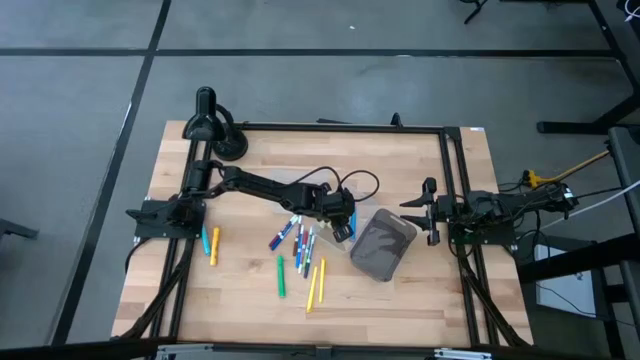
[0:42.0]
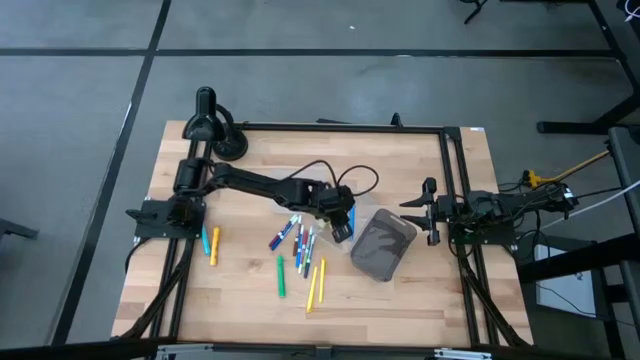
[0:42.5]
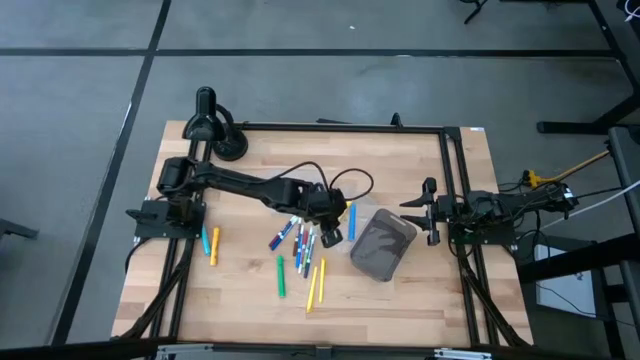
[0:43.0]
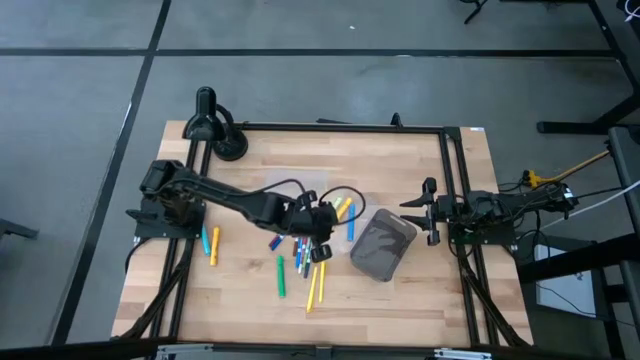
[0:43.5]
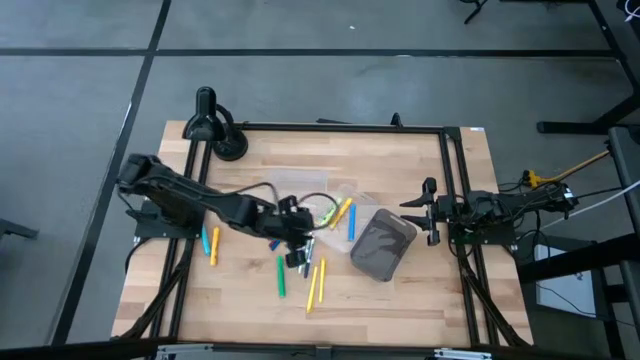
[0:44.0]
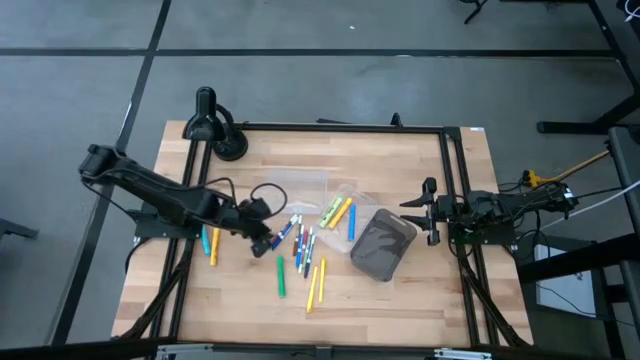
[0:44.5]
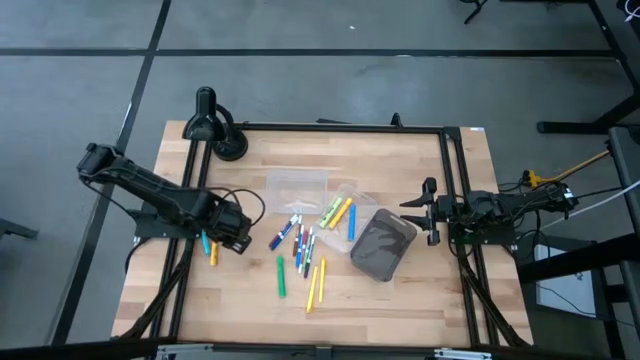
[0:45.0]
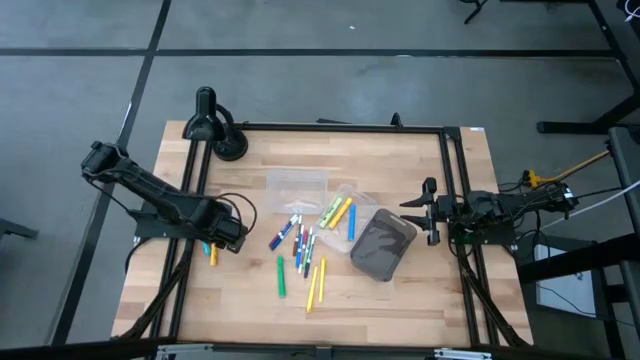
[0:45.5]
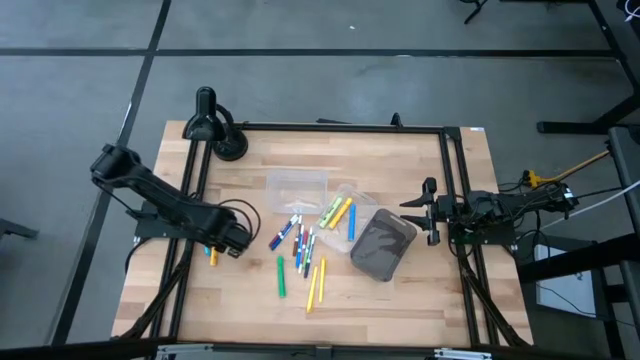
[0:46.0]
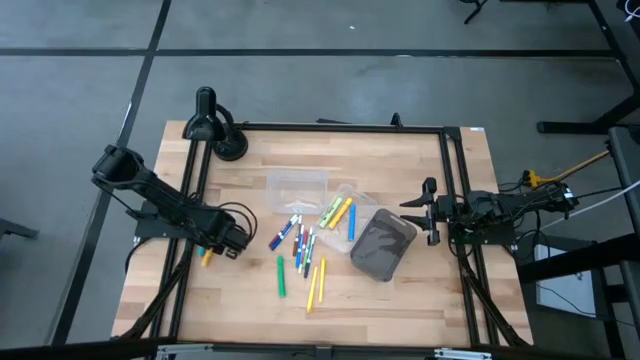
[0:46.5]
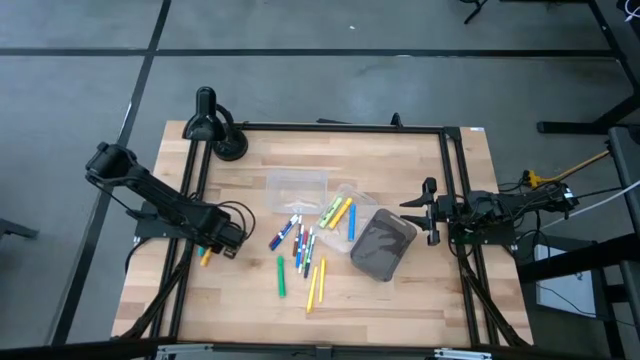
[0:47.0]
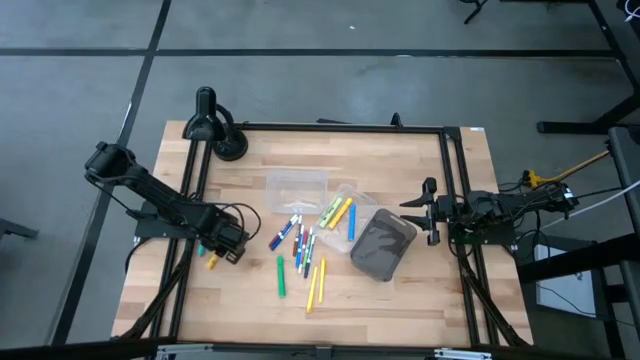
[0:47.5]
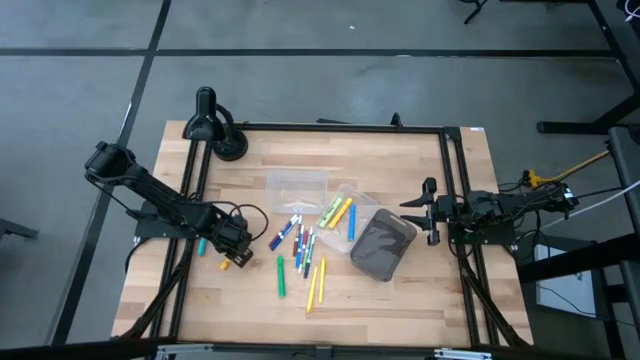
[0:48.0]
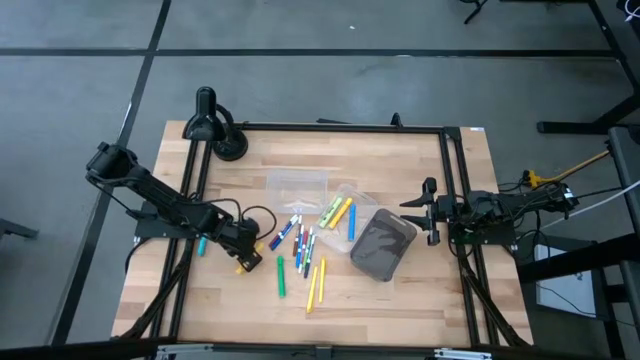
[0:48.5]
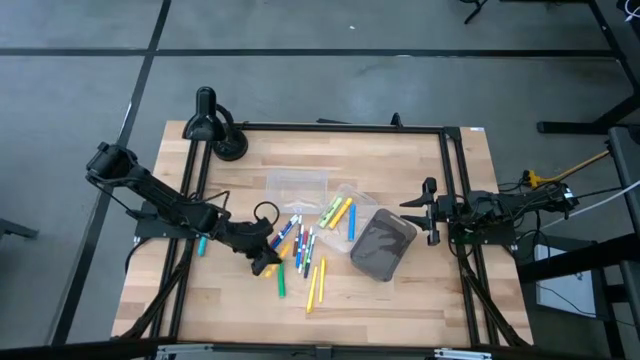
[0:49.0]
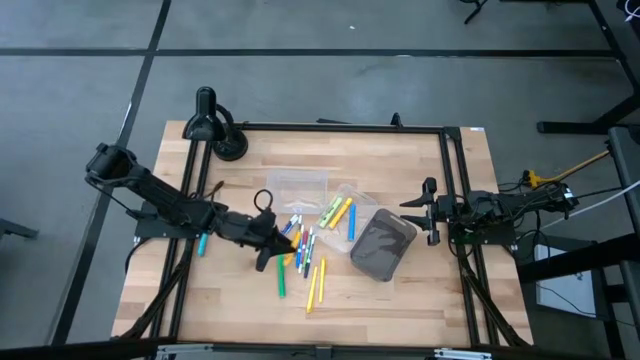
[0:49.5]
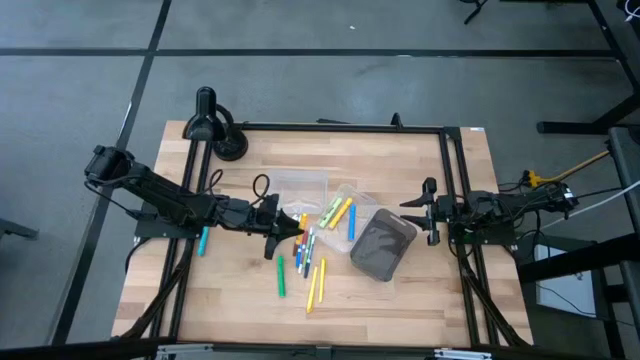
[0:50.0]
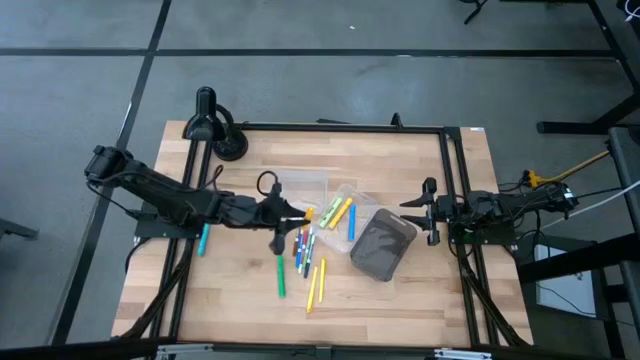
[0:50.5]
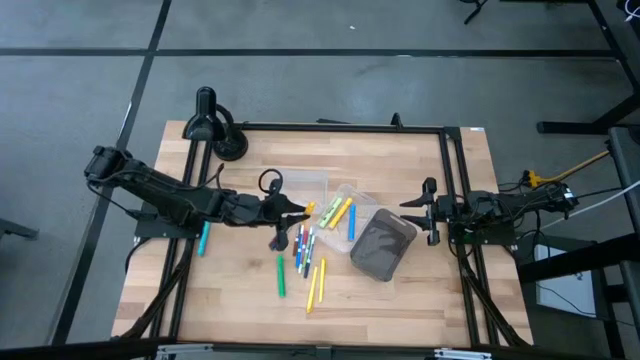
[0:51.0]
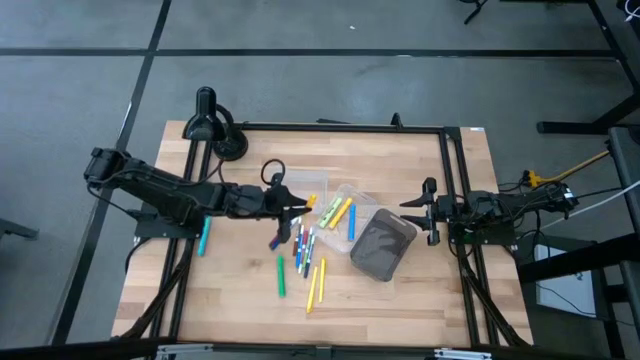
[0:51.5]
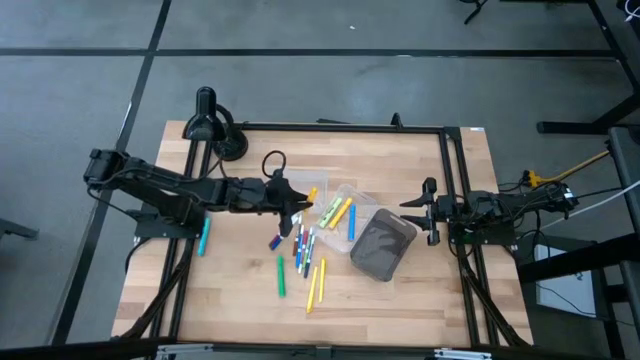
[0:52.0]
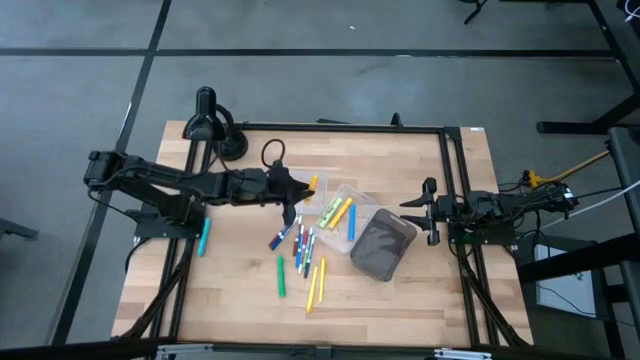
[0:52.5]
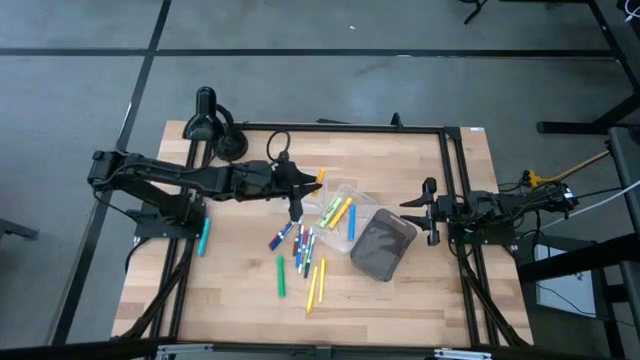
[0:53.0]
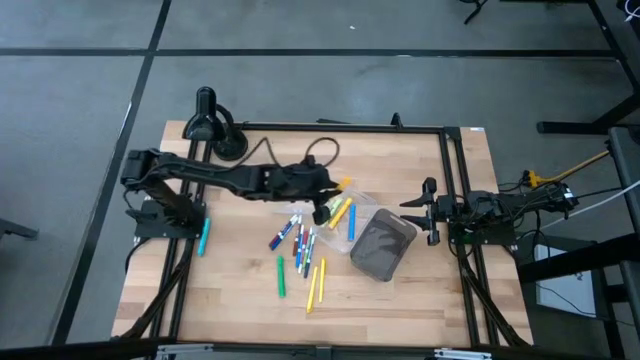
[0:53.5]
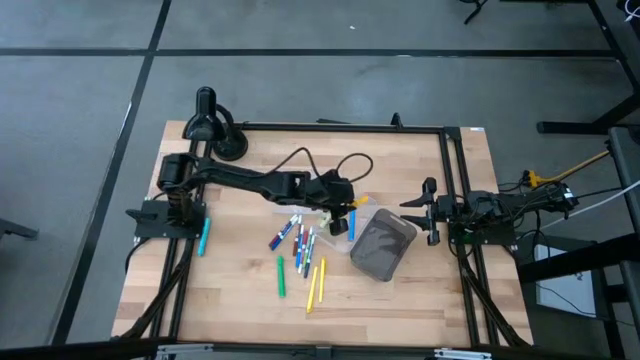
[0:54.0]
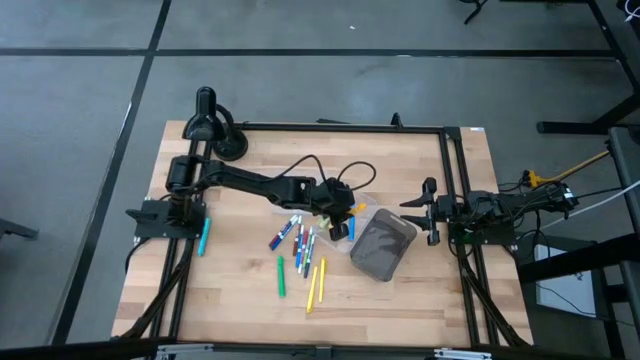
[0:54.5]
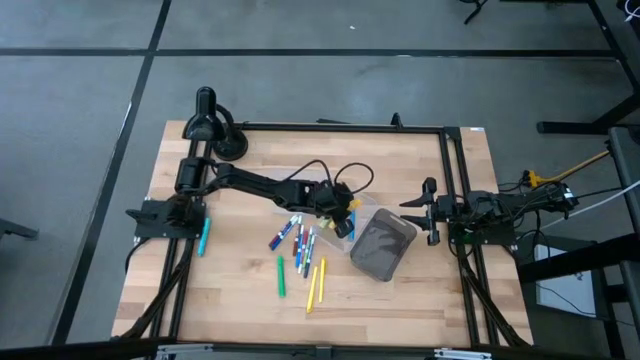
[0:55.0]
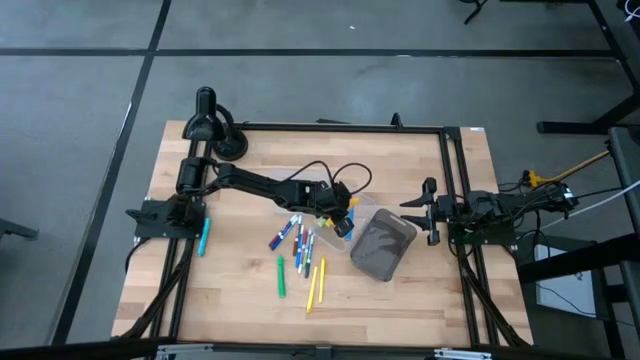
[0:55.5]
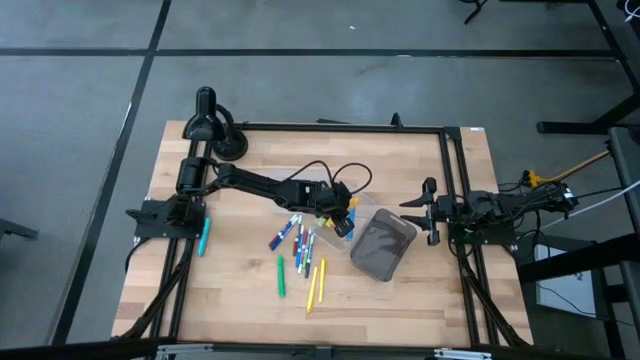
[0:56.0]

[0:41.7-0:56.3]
Task: Pick & Place Markers
Put the yellow highlighter pen into the right transparent bin

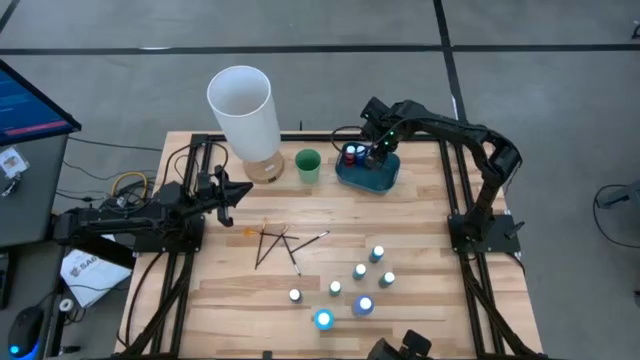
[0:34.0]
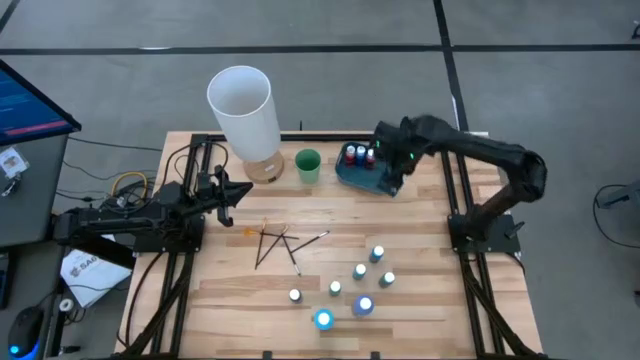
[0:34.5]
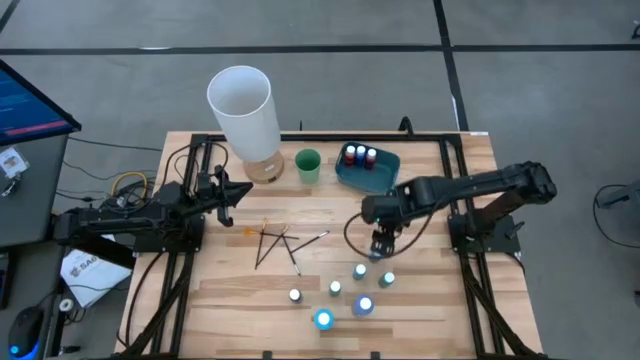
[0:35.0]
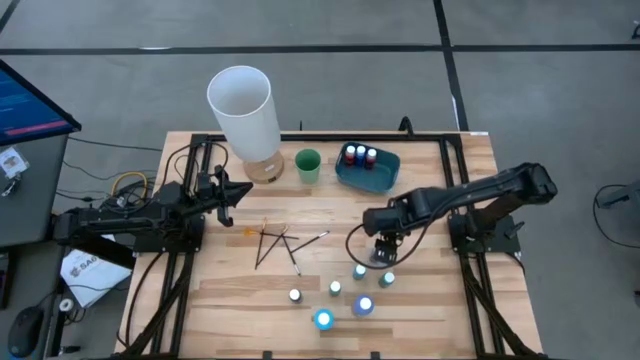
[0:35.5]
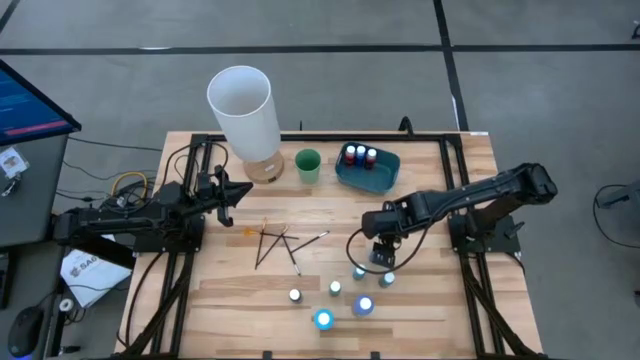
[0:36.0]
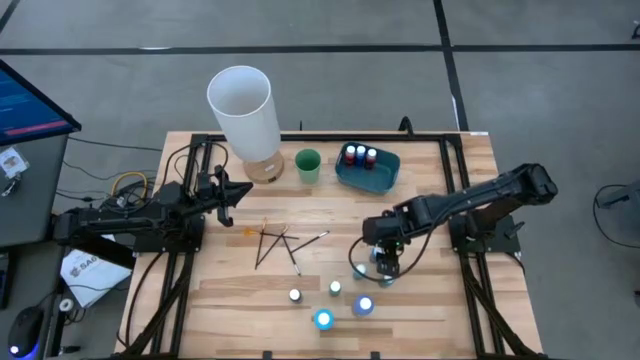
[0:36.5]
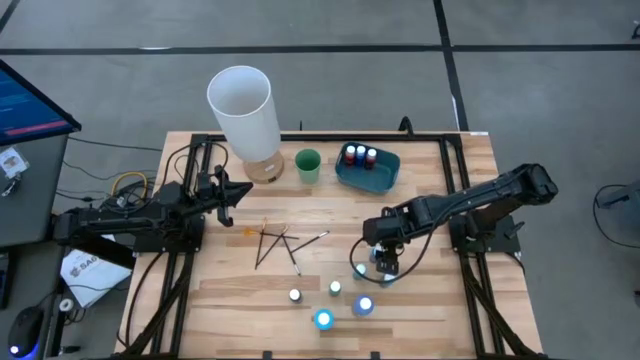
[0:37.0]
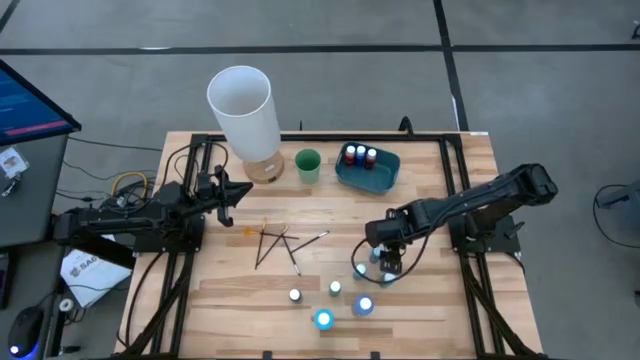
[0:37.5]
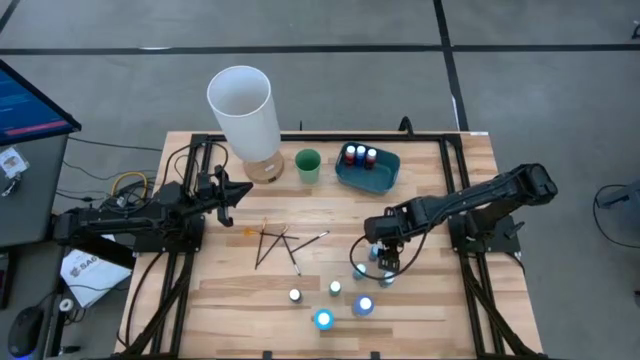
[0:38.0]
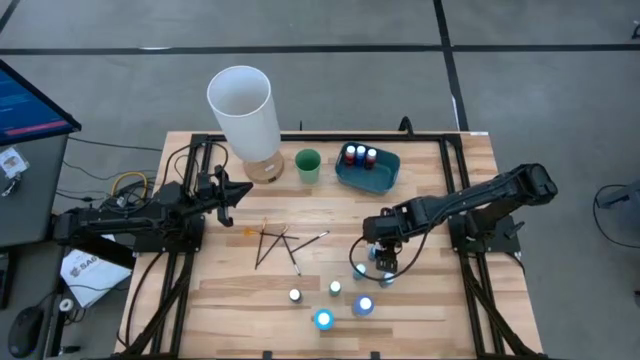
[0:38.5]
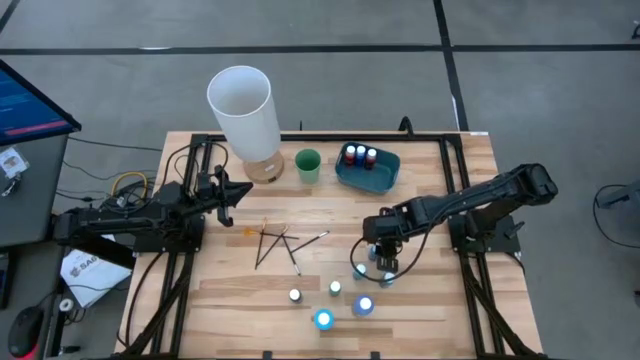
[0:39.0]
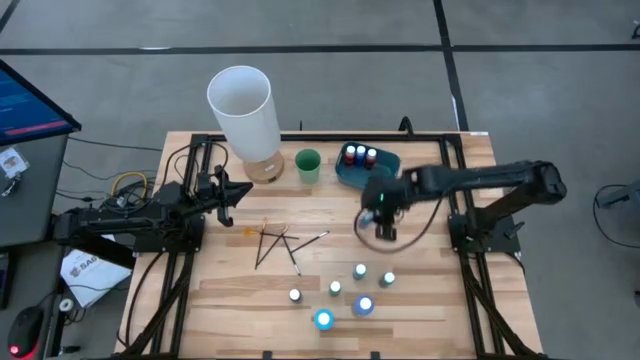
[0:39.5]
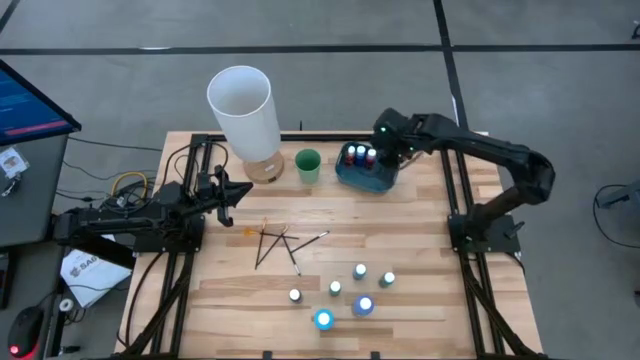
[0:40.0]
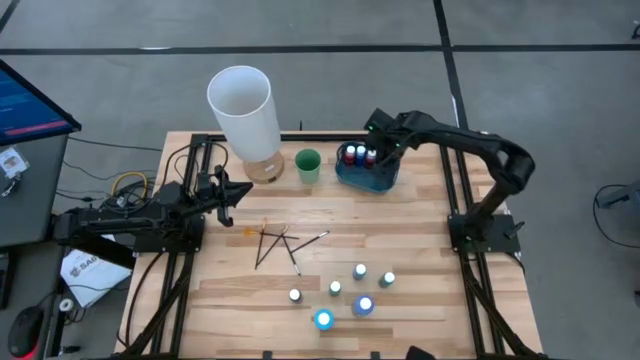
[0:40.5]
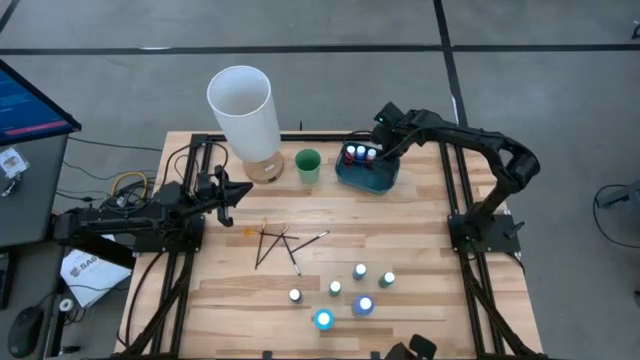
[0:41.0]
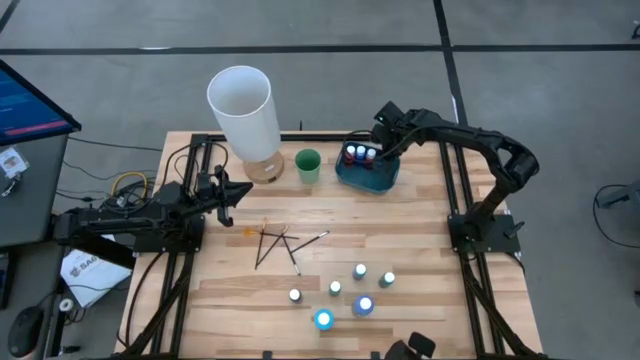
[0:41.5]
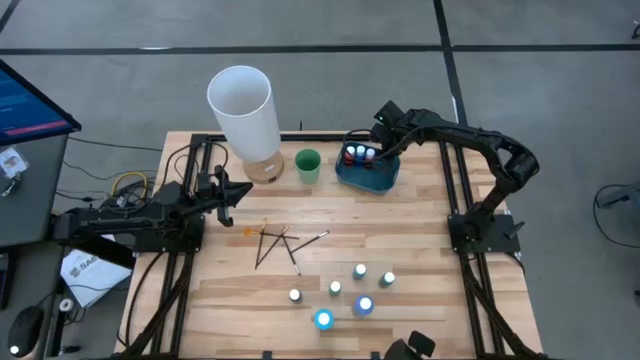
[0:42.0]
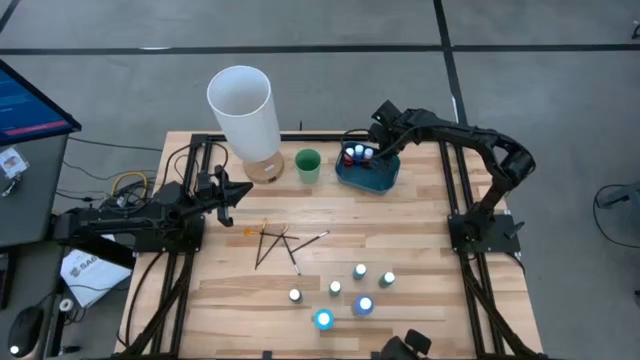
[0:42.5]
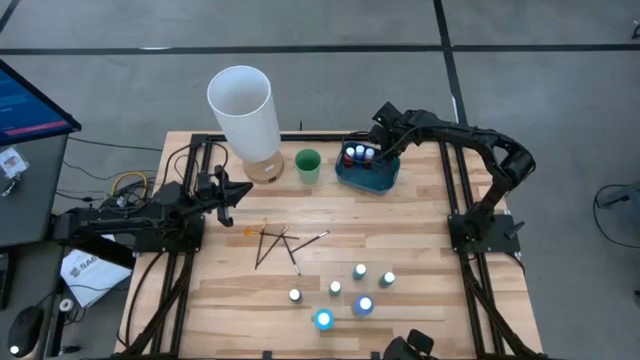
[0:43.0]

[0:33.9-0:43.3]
Task: Pick & Place Paint Supplies
Put the light blue paint bottle into the blue bin
